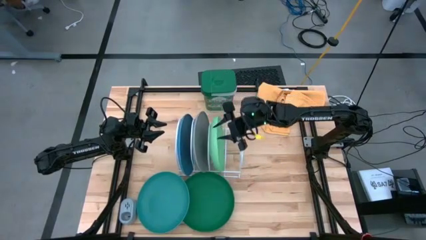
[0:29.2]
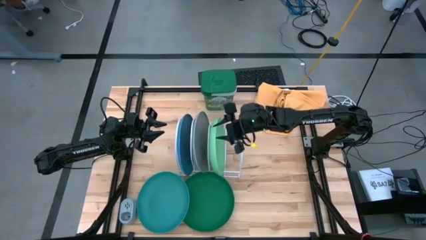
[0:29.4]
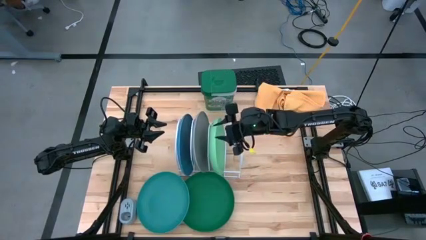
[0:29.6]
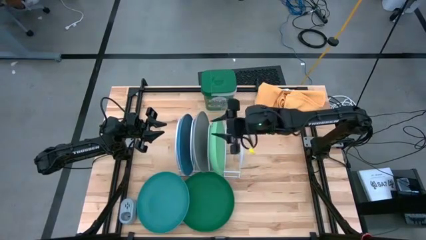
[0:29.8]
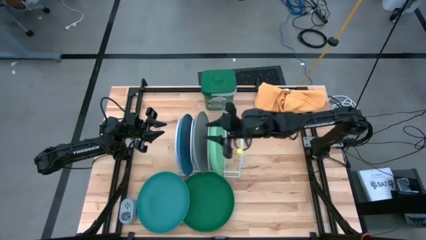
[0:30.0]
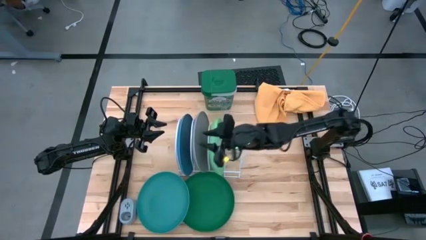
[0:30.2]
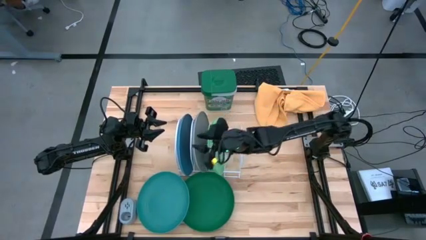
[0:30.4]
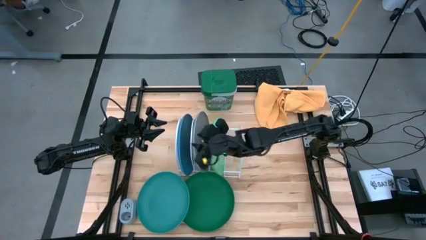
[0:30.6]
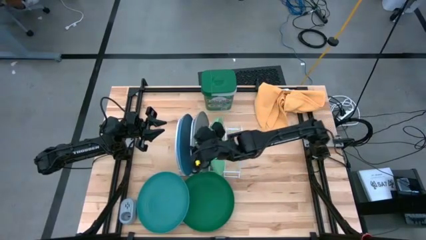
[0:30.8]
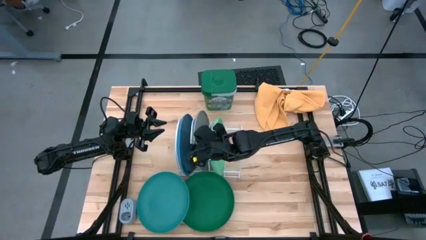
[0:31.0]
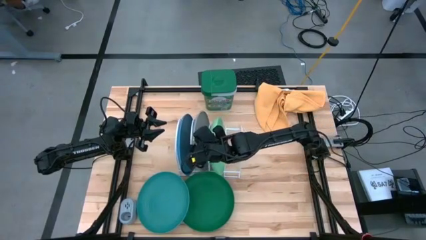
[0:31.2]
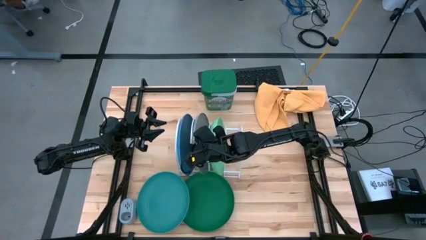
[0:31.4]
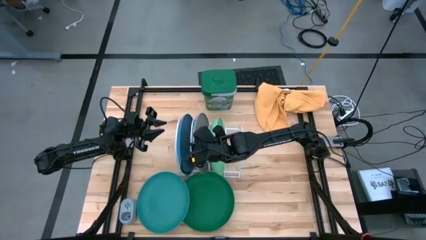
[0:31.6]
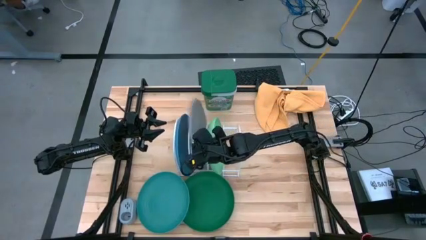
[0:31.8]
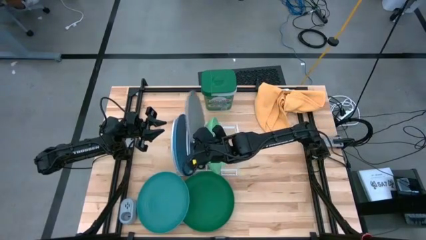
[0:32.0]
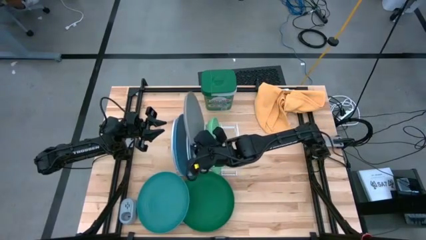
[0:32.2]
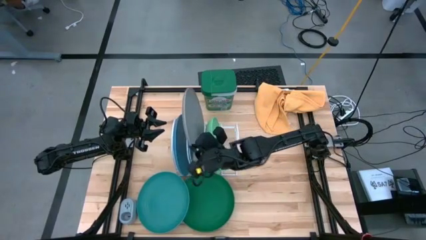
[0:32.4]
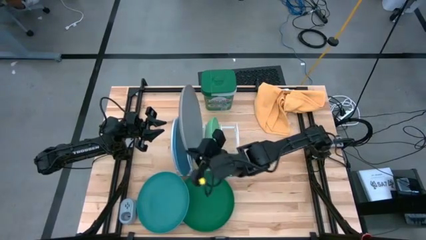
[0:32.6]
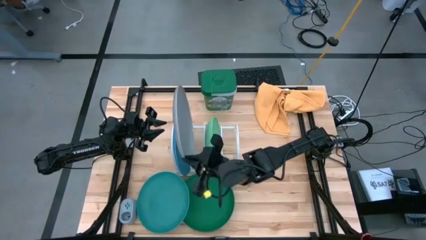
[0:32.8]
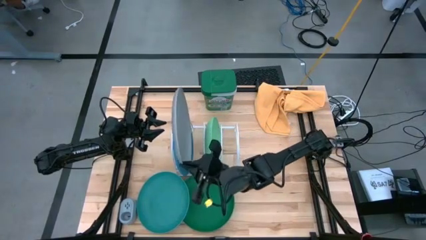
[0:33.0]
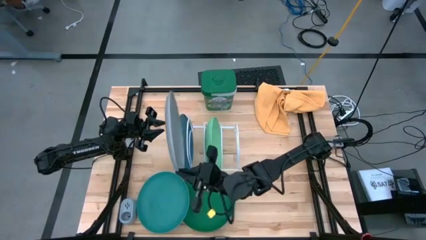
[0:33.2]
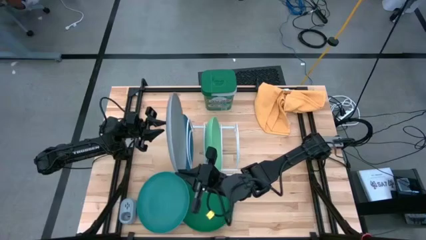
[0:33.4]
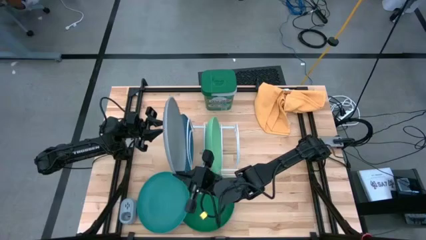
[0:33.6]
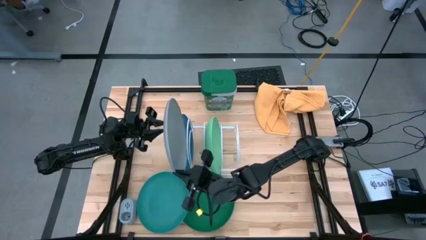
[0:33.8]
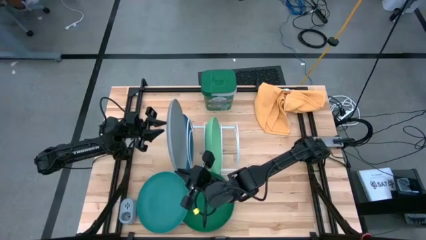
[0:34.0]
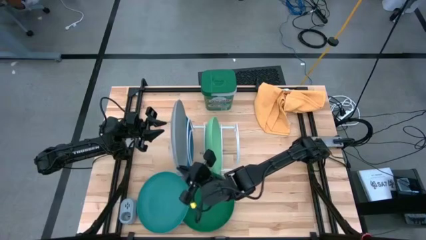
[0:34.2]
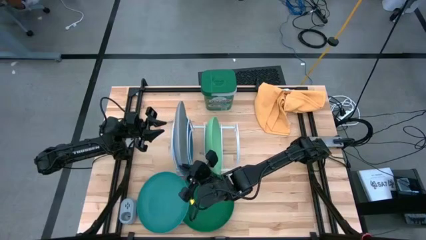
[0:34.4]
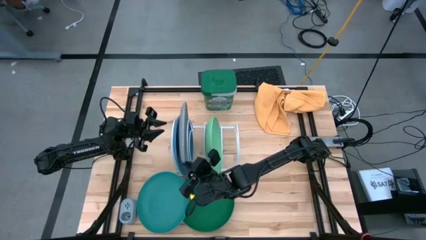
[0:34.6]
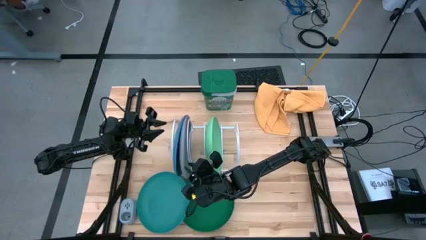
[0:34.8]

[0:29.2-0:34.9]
Task: Sort dishes
Put the gray plate in the dish rack

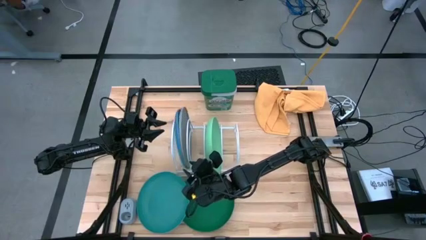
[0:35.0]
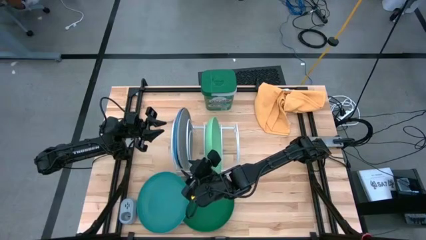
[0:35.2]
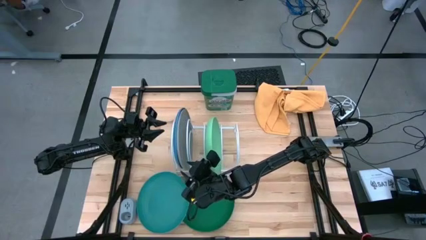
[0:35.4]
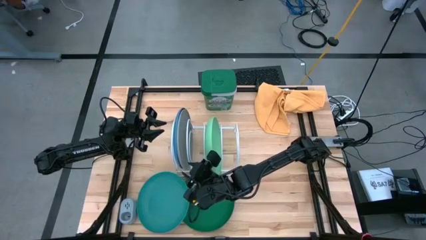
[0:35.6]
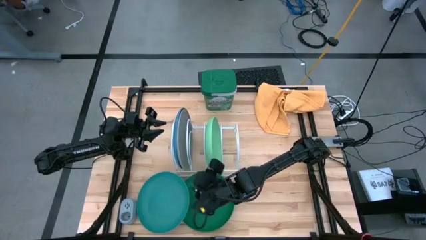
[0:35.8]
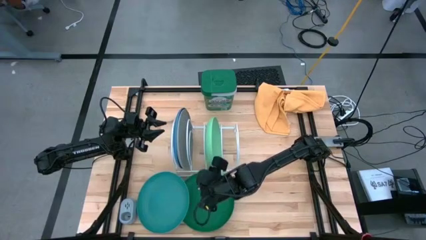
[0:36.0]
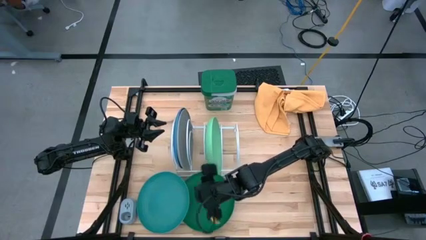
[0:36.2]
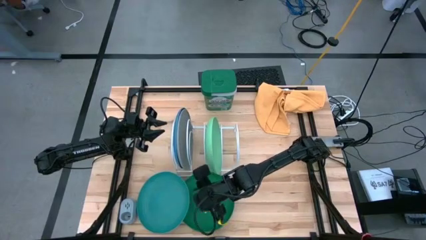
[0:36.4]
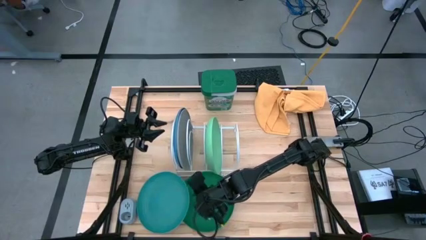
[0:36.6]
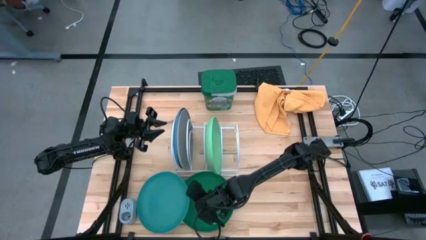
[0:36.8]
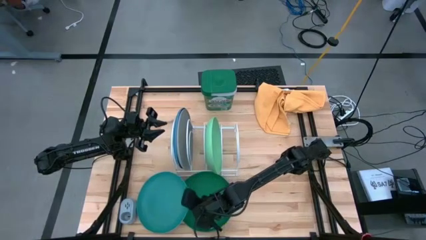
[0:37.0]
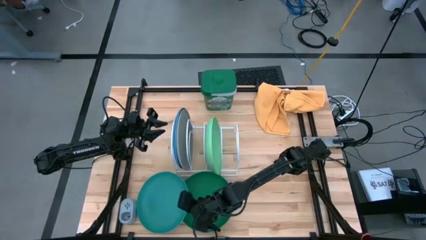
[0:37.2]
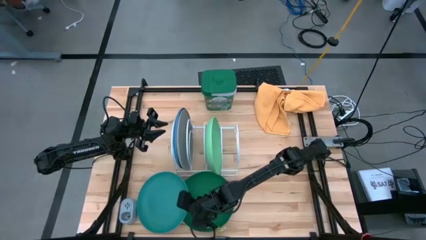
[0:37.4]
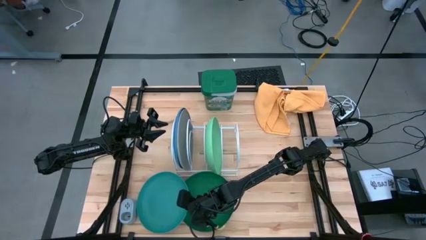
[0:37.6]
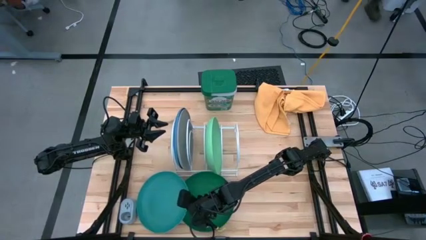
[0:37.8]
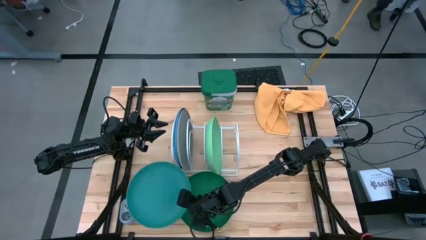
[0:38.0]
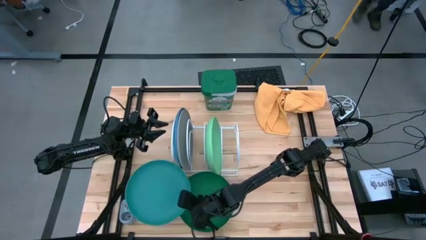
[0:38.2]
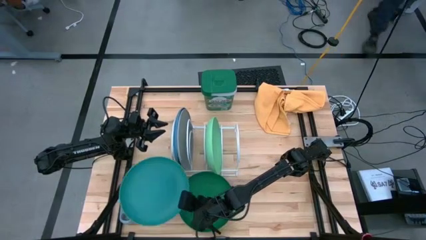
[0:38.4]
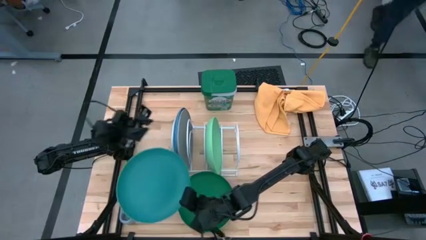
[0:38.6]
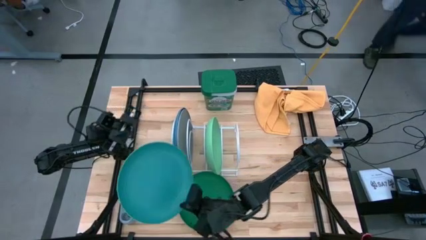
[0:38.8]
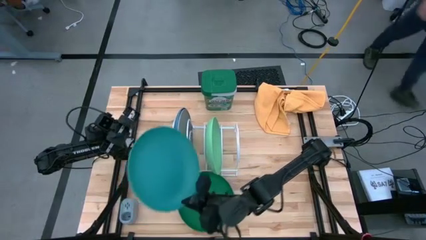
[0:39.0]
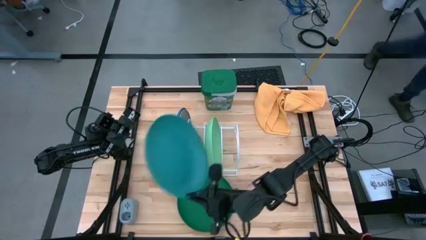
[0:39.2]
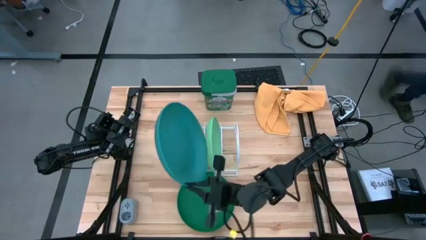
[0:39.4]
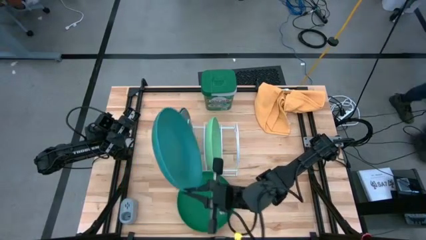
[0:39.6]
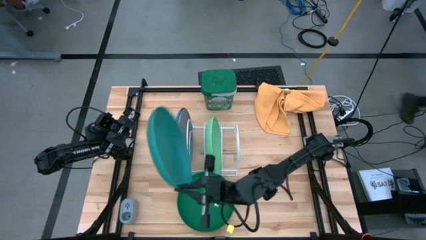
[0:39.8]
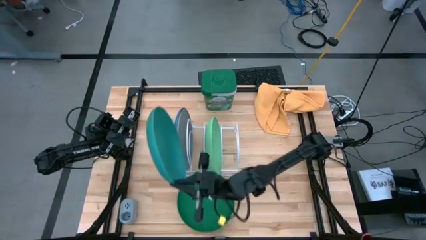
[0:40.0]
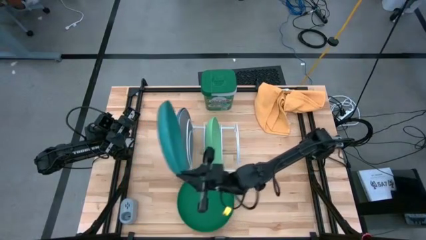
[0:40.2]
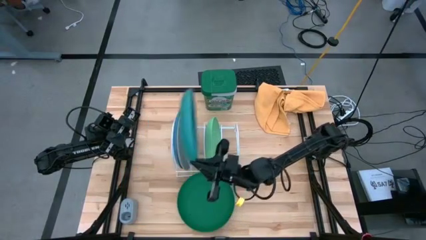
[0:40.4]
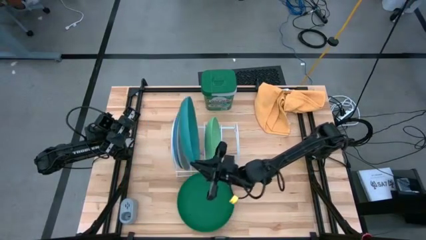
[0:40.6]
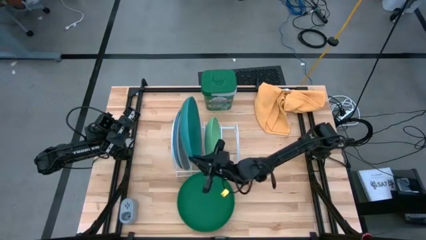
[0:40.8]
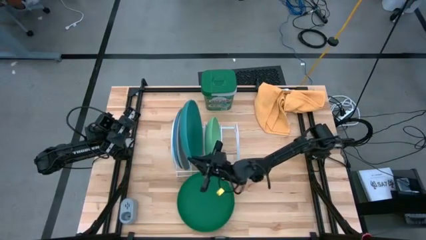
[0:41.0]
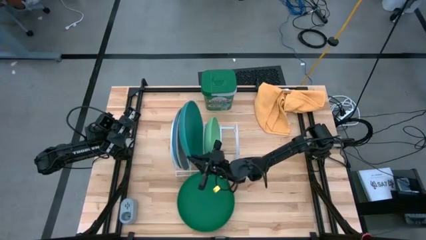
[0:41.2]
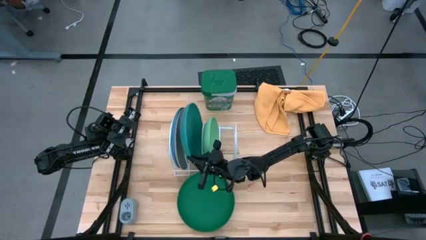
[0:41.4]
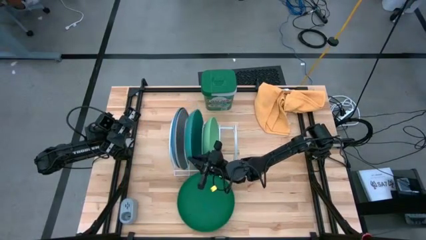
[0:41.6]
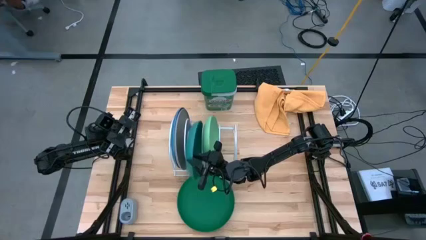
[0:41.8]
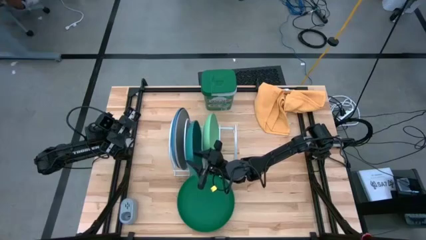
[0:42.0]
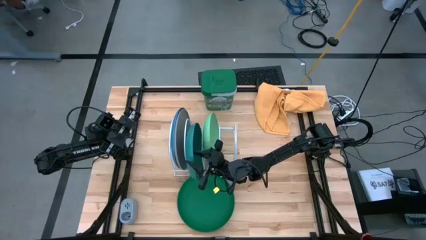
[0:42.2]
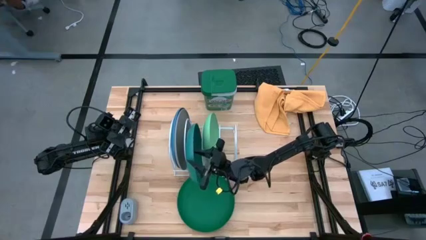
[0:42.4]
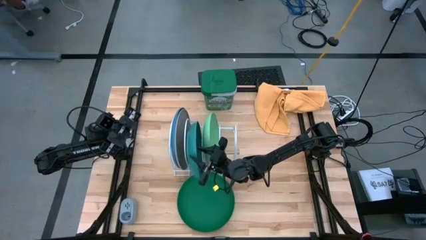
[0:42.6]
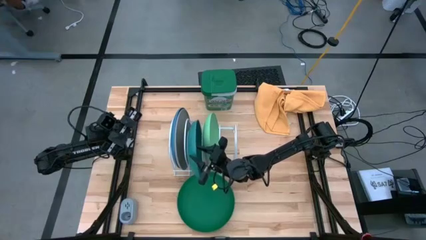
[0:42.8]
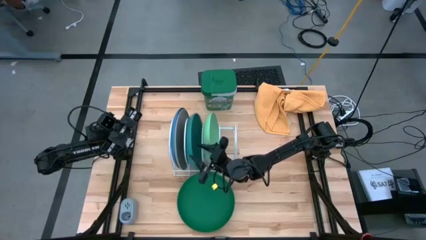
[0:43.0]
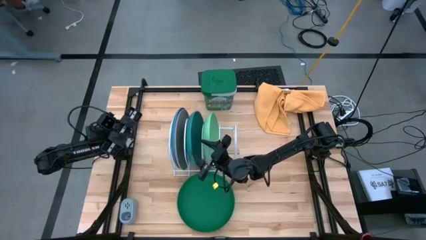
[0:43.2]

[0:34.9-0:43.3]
Put the green plate in the dish rack

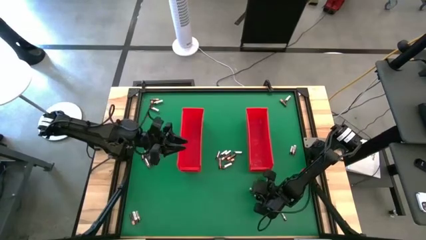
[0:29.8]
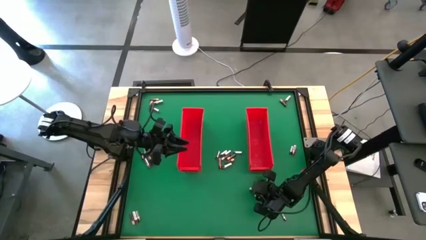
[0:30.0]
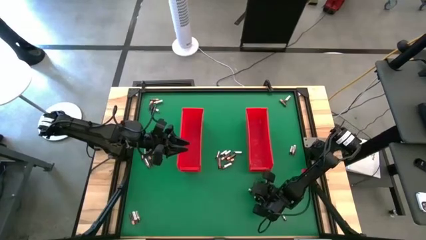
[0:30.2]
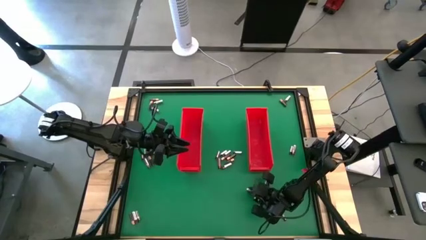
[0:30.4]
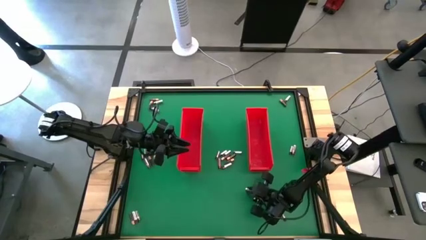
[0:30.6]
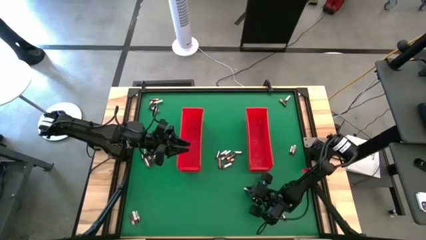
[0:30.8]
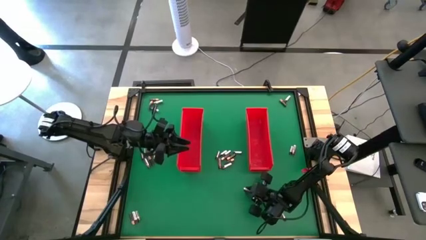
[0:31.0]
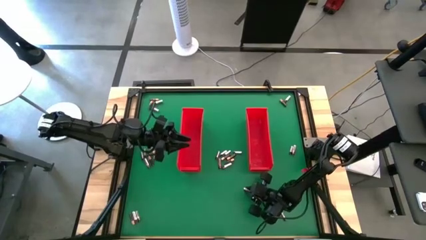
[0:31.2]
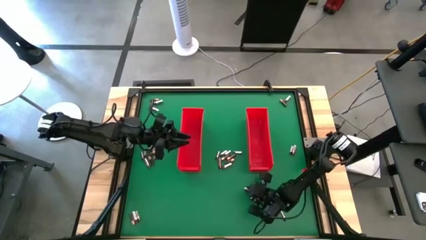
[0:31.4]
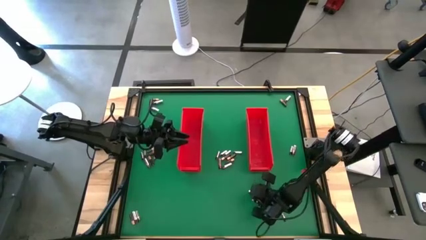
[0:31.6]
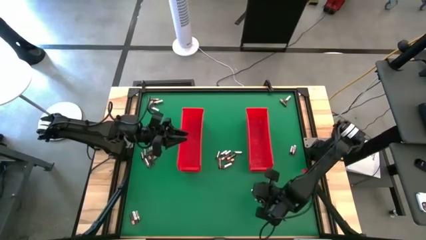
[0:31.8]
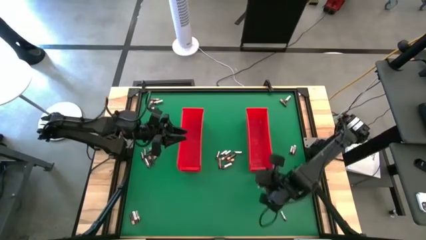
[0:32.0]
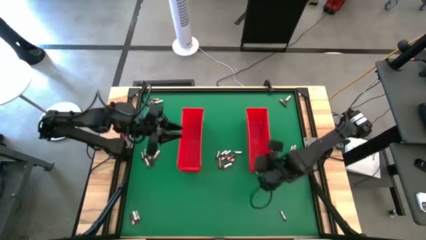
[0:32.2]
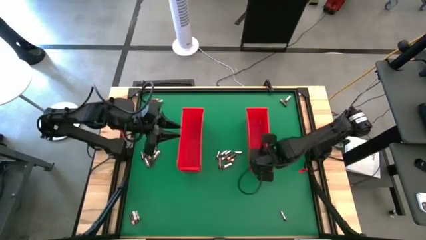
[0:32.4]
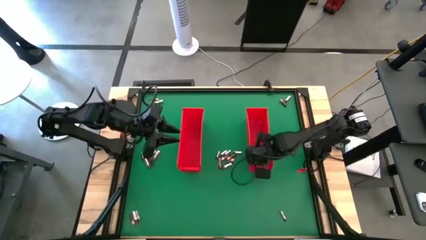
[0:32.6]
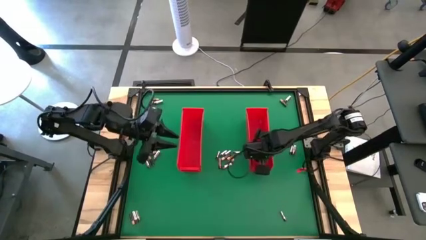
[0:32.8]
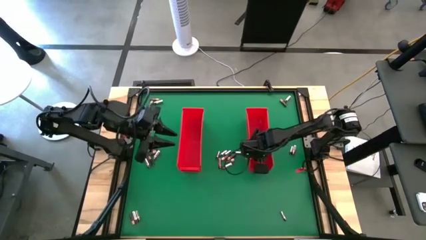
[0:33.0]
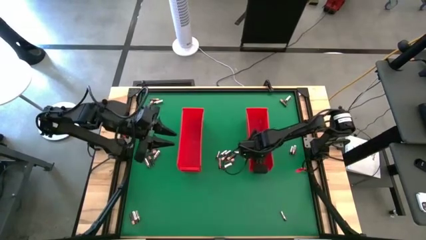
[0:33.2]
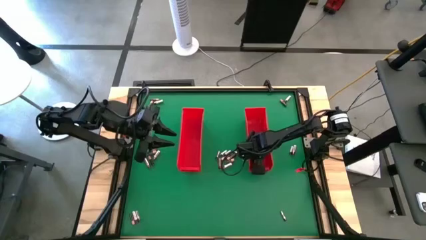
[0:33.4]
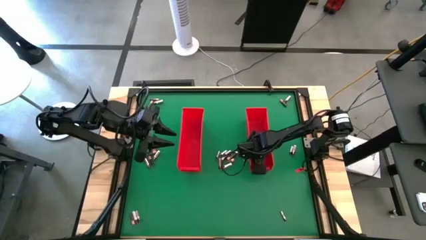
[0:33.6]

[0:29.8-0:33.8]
Task: Sort batteries
Put the silver battery into the right red bin
